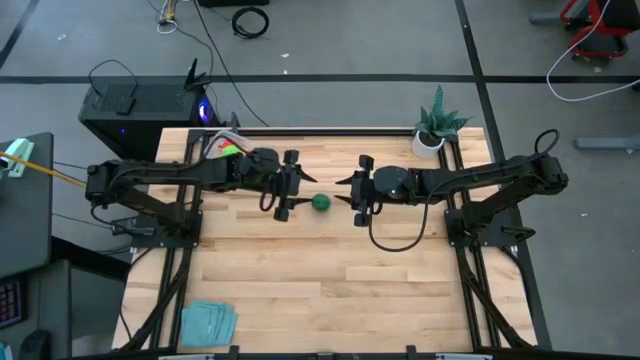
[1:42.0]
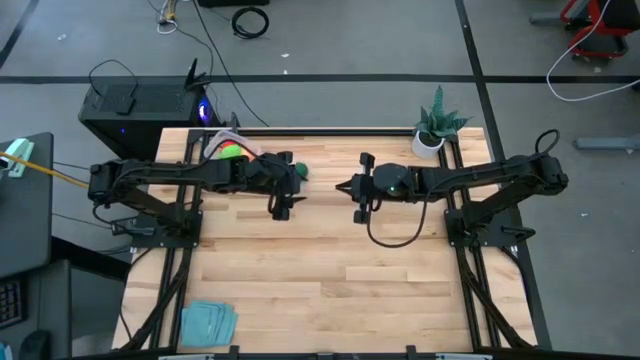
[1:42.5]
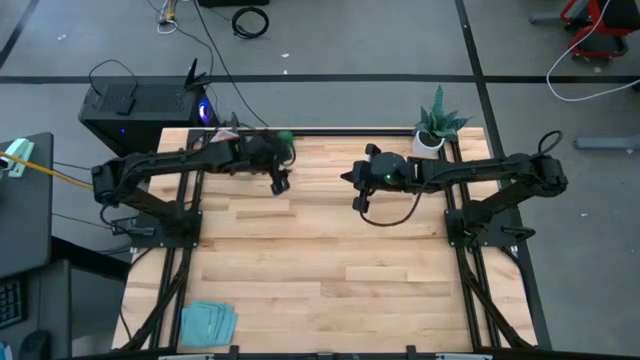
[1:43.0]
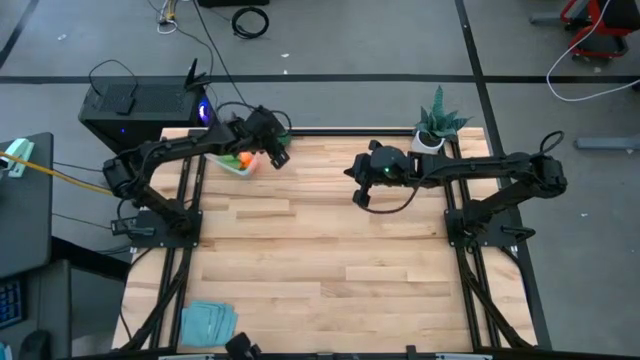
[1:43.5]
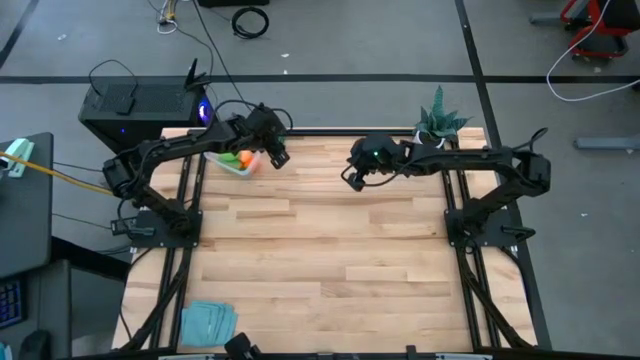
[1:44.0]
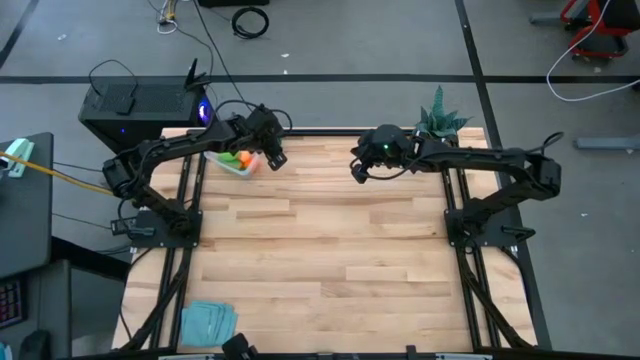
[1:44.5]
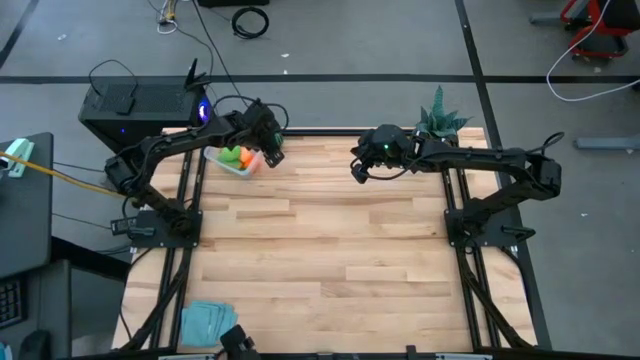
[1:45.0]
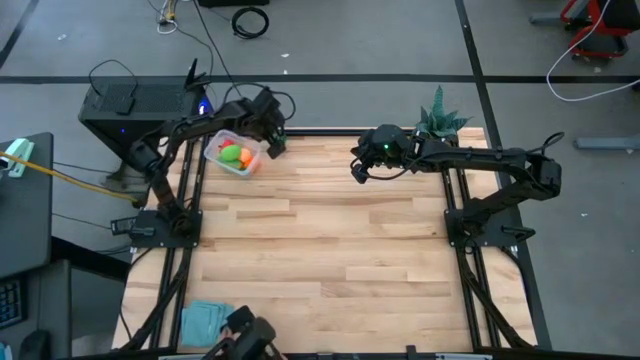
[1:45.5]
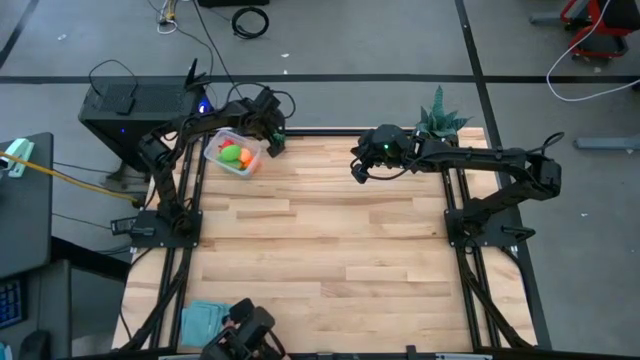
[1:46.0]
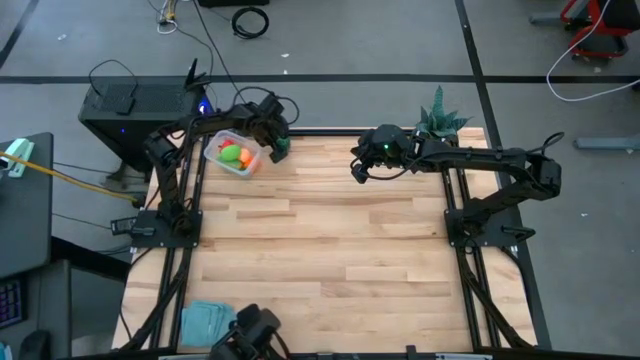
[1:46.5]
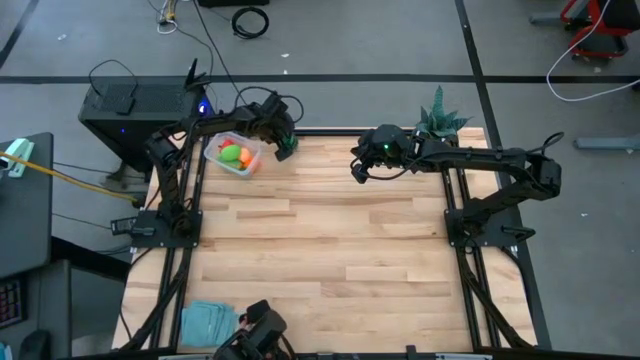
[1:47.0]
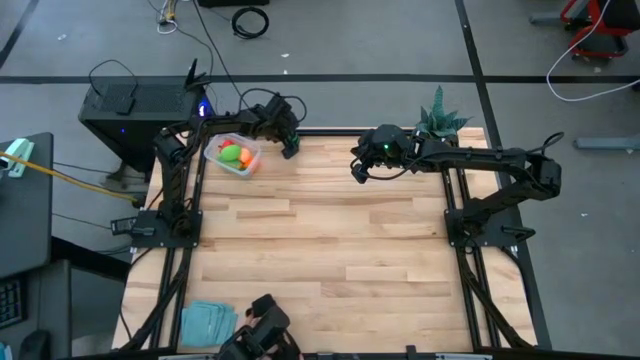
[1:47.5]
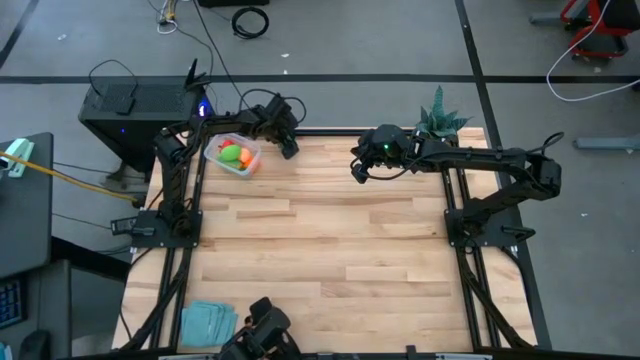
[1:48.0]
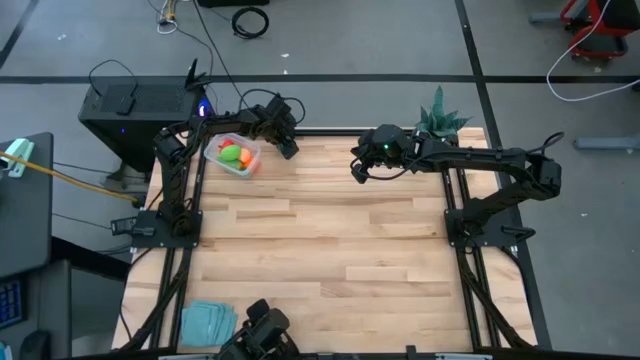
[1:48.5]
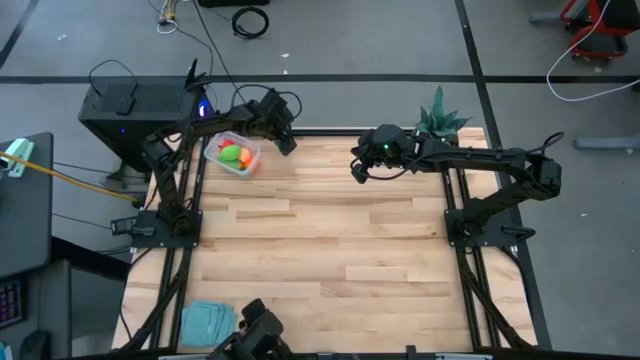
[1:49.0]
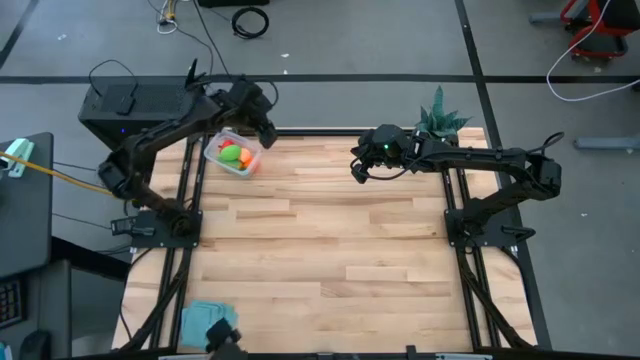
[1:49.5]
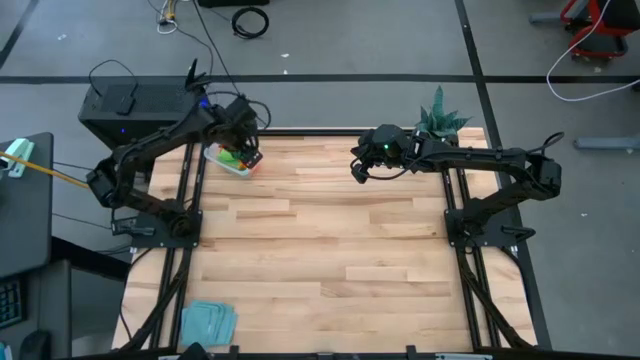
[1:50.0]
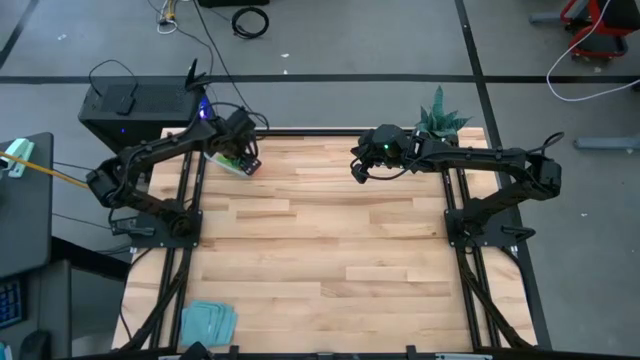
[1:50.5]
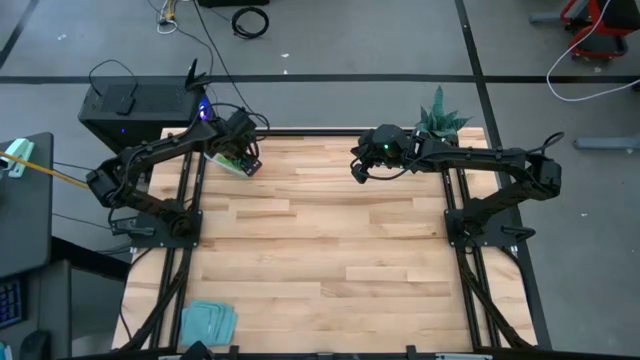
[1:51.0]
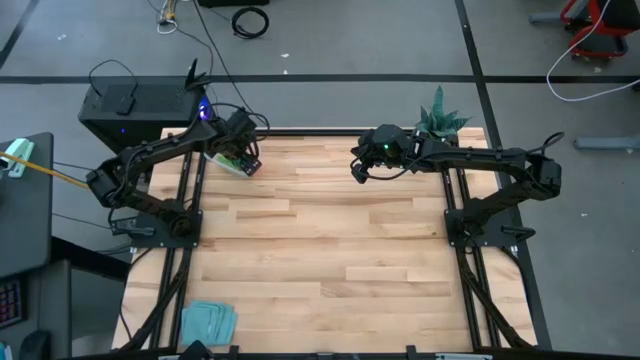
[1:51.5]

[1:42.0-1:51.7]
Task: Pick and placing Produce into tupperware
Put the green watermelon into the transparent bin

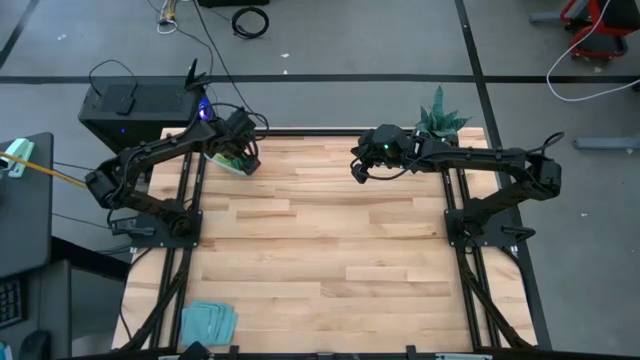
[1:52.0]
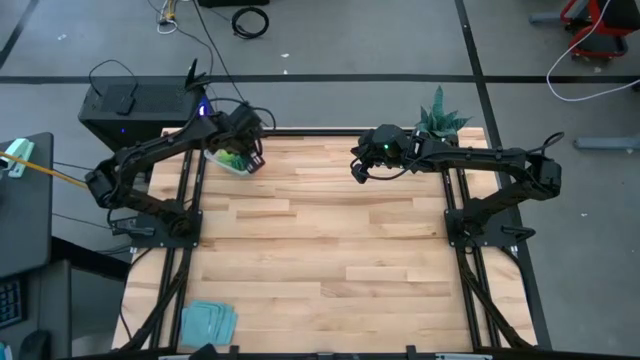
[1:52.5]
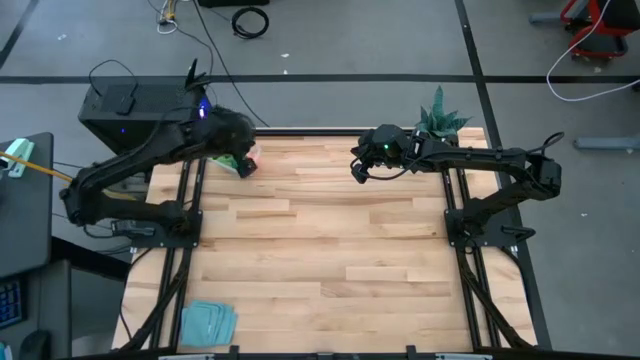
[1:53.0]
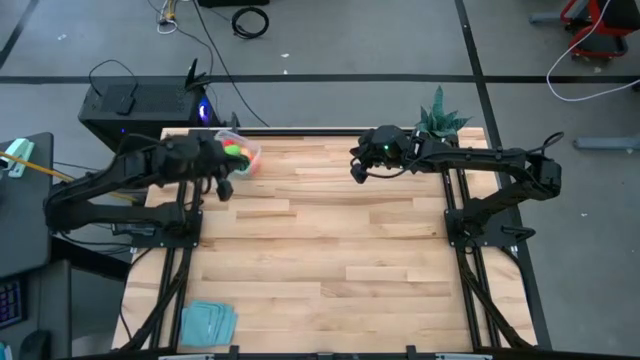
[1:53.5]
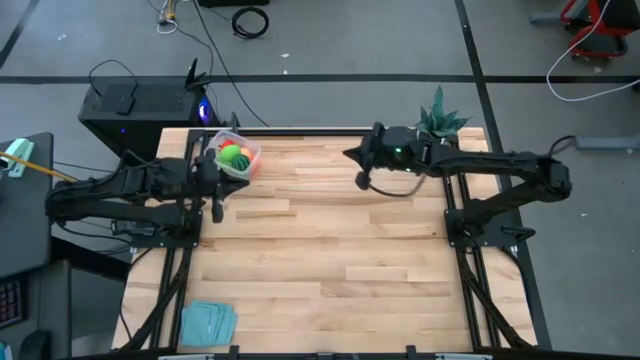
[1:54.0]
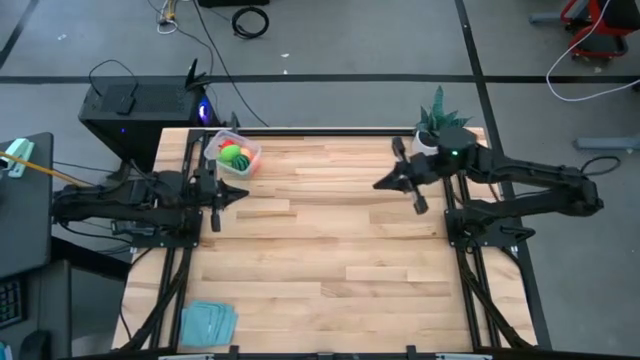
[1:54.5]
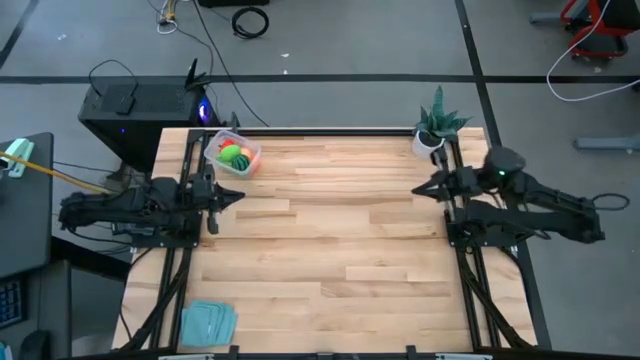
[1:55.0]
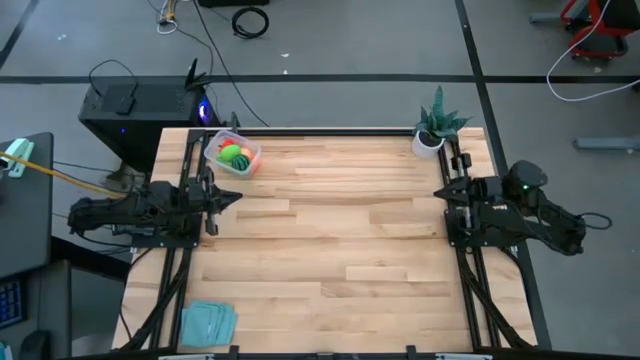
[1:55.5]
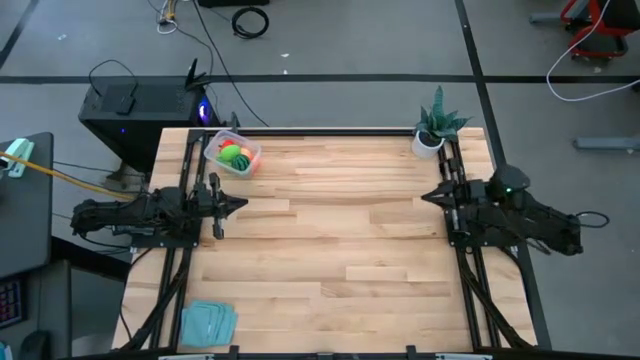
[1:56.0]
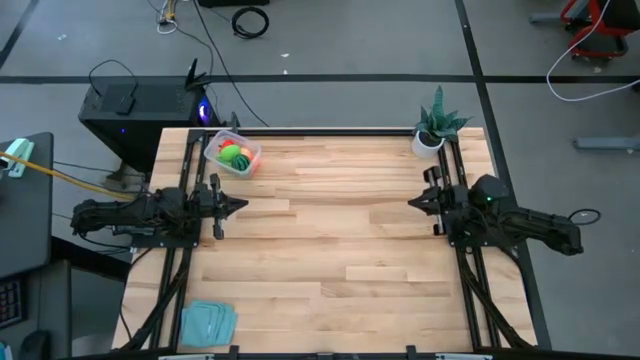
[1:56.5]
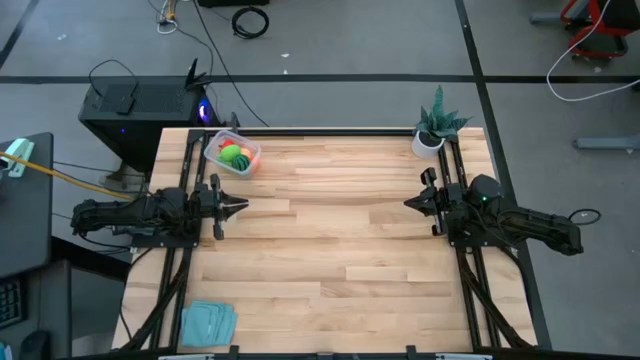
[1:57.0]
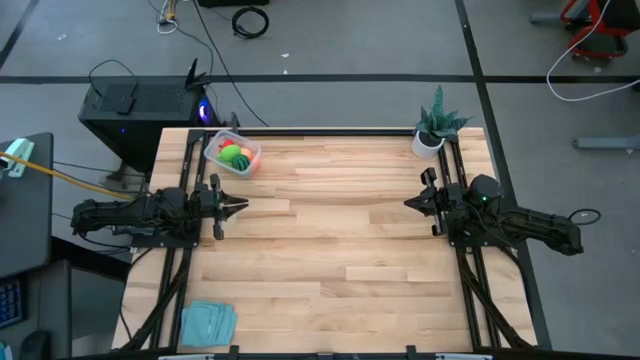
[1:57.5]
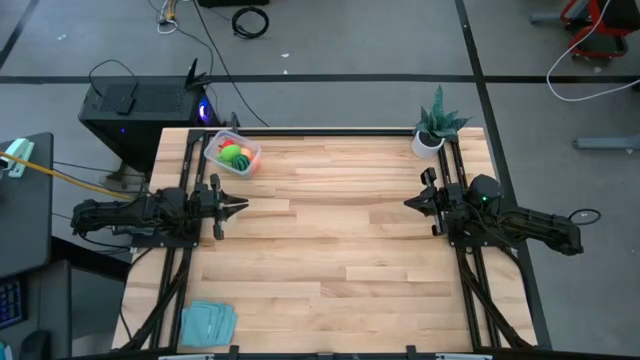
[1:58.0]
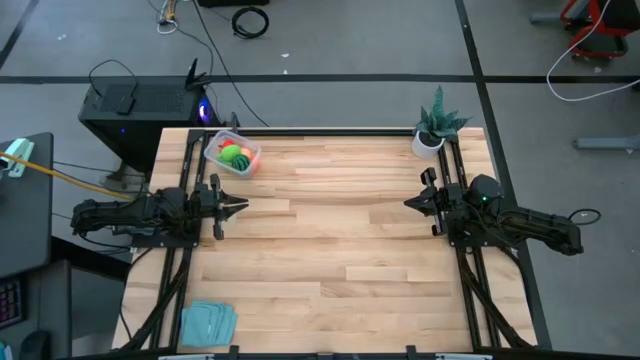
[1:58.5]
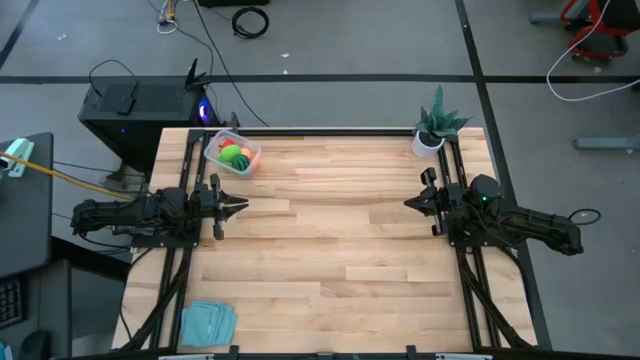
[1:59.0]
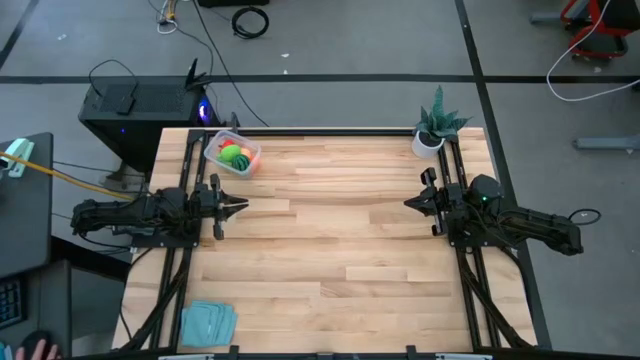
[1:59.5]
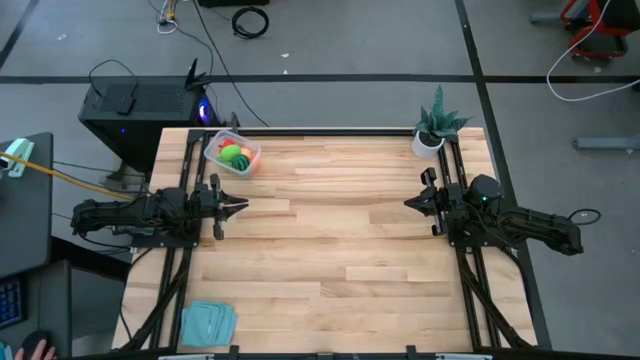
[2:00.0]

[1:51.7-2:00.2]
Return to Home Position

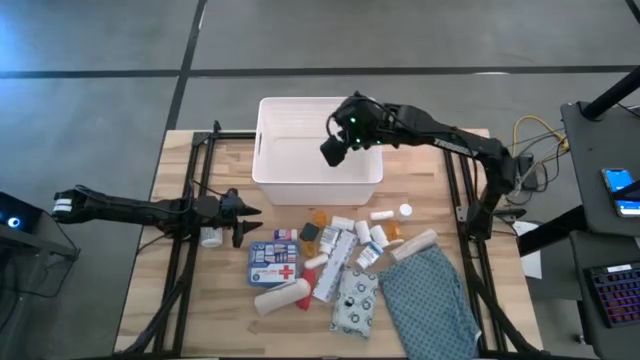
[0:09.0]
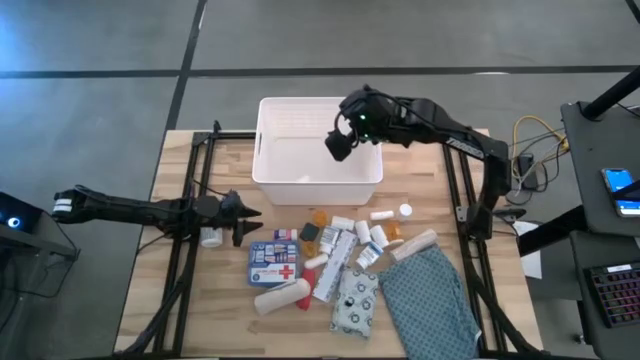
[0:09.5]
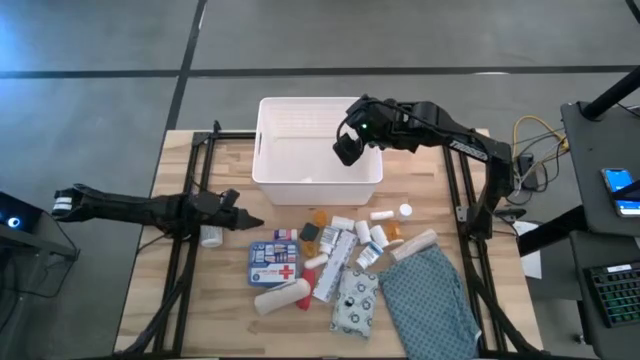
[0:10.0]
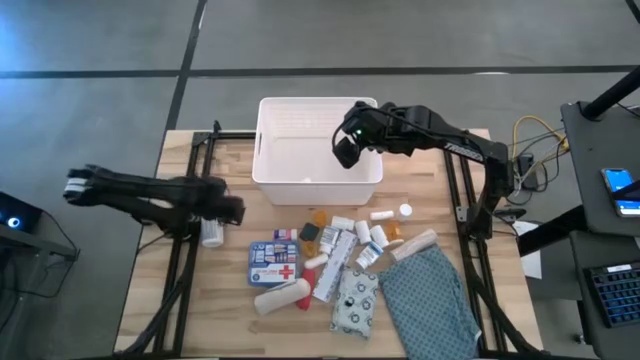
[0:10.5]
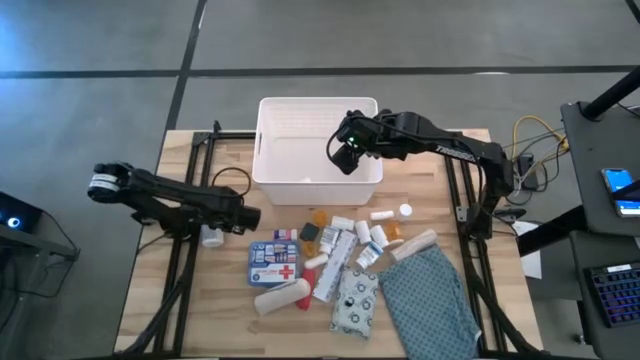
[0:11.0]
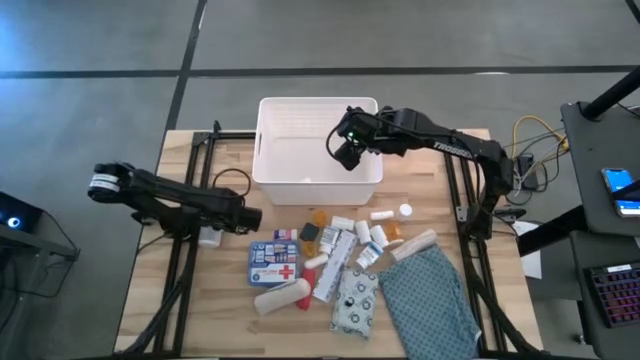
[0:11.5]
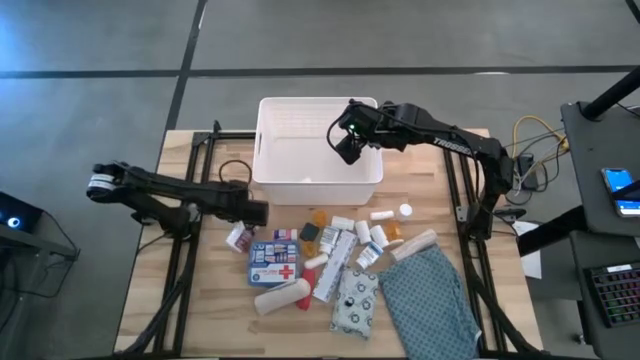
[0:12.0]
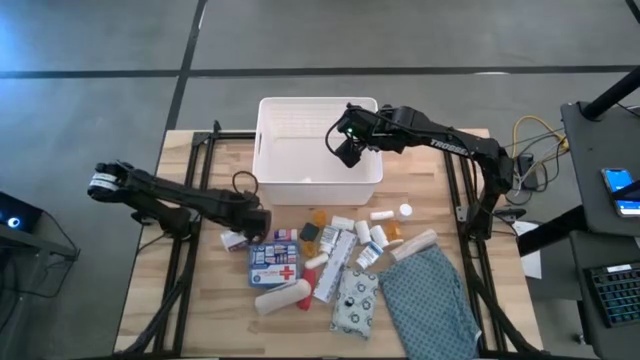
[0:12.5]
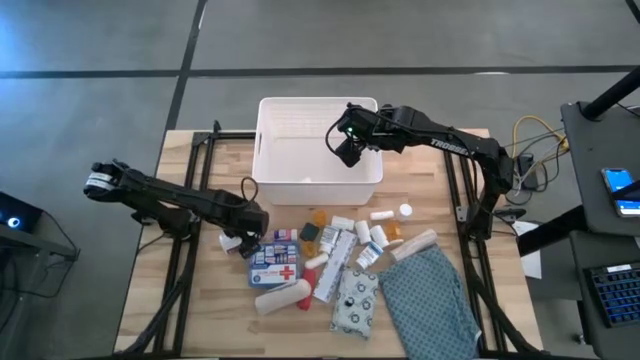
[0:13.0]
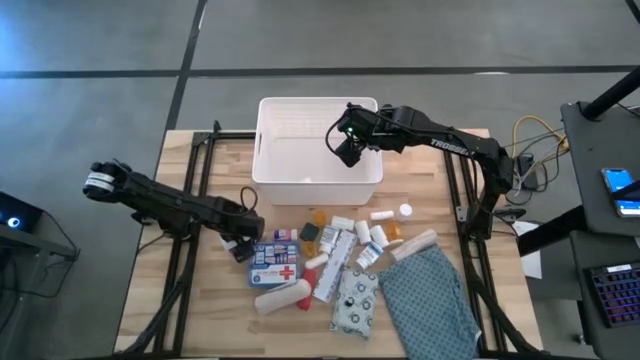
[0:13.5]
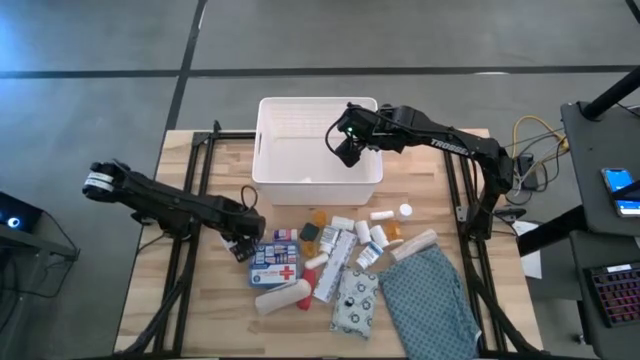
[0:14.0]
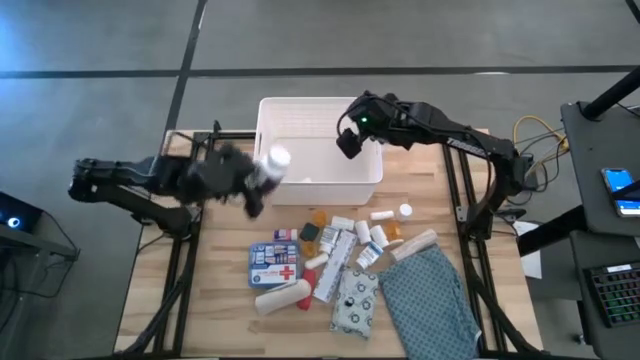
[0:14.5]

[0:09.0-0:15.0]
Task: Pick & place medical supplies in basket/bin
Put the white and purple bottle into the white bin
